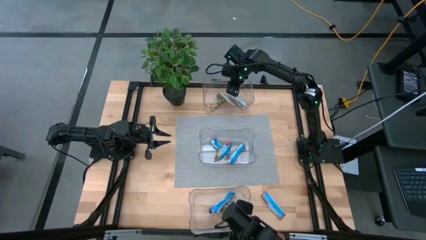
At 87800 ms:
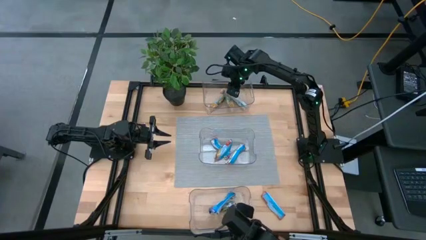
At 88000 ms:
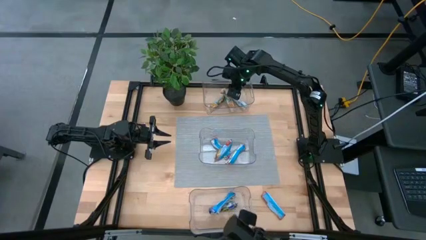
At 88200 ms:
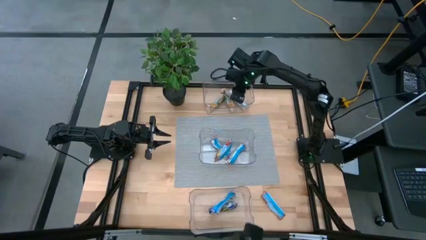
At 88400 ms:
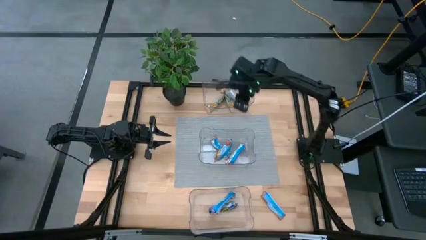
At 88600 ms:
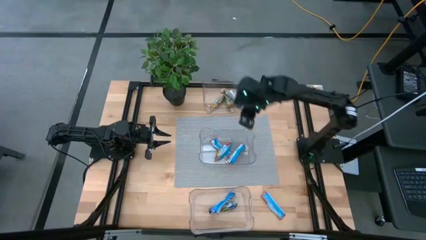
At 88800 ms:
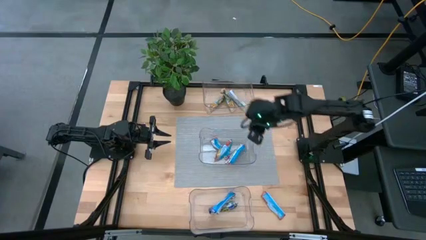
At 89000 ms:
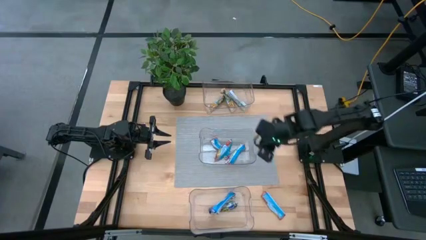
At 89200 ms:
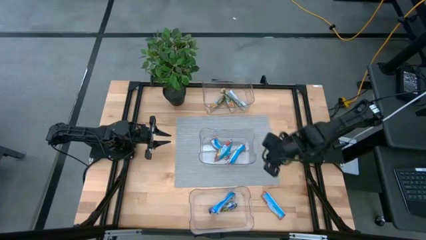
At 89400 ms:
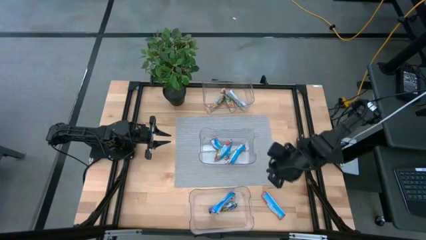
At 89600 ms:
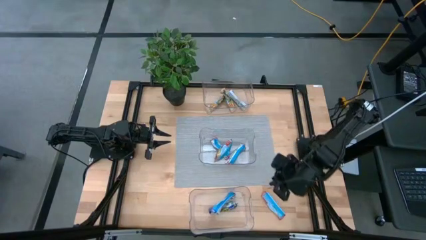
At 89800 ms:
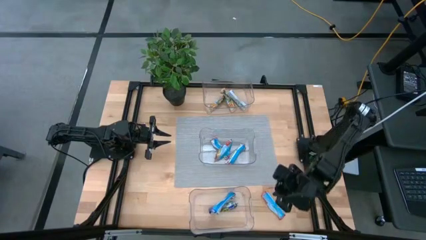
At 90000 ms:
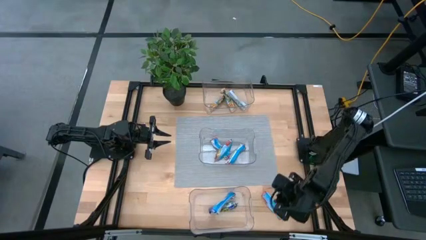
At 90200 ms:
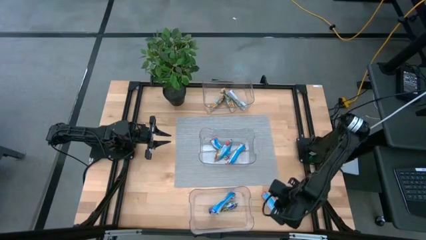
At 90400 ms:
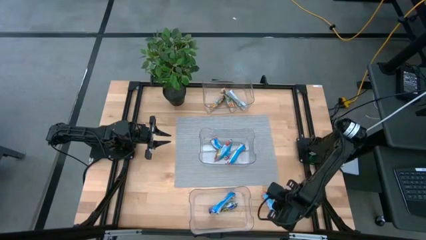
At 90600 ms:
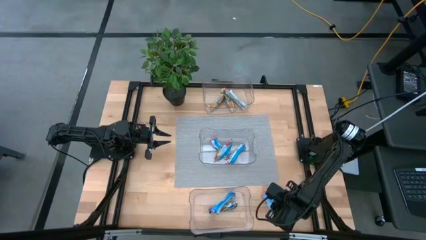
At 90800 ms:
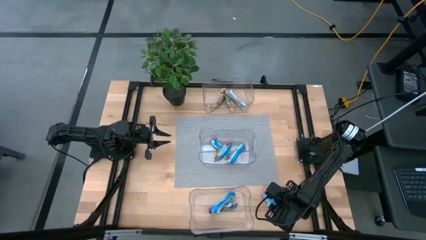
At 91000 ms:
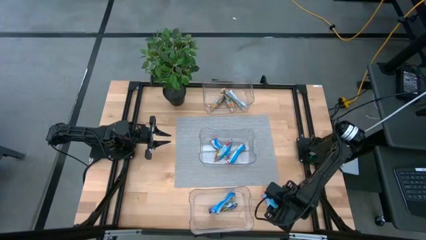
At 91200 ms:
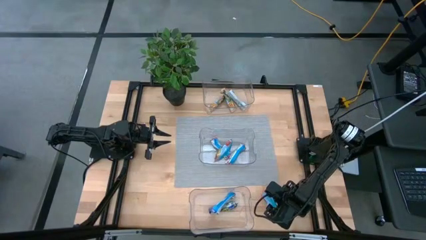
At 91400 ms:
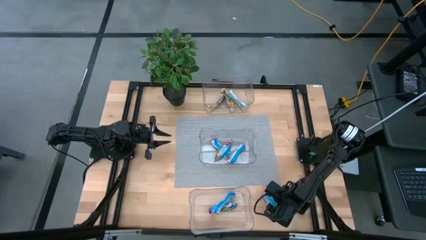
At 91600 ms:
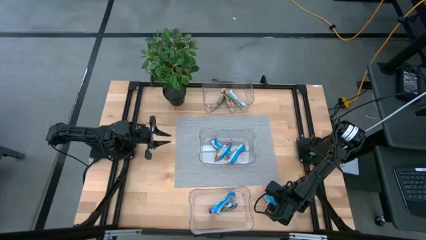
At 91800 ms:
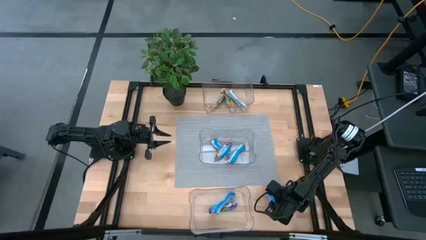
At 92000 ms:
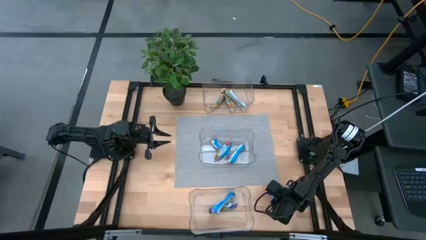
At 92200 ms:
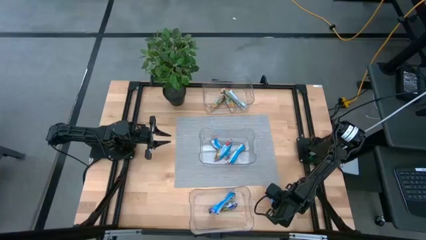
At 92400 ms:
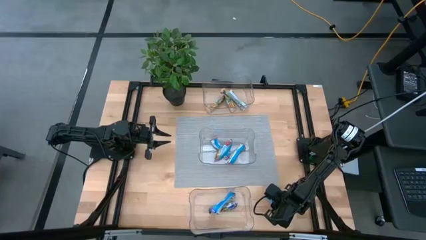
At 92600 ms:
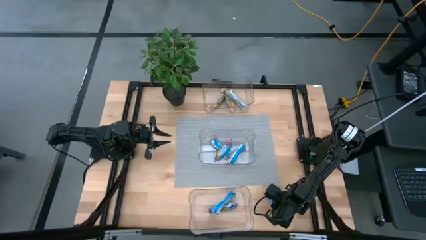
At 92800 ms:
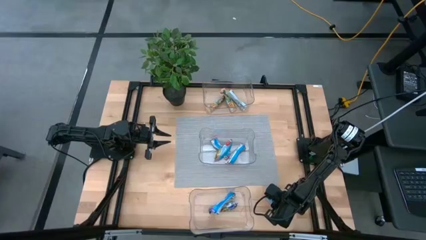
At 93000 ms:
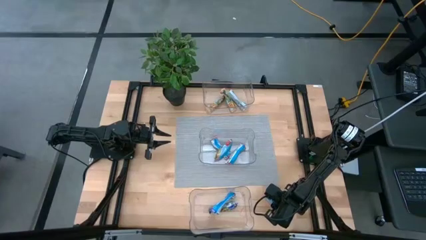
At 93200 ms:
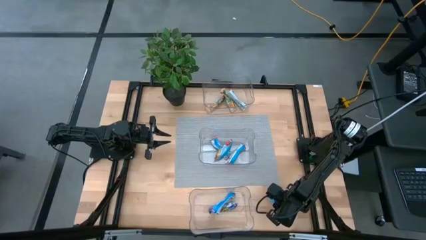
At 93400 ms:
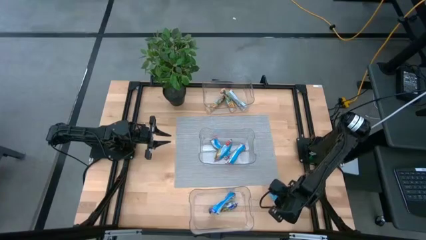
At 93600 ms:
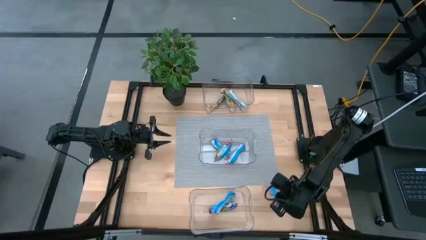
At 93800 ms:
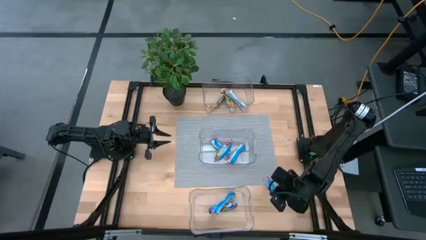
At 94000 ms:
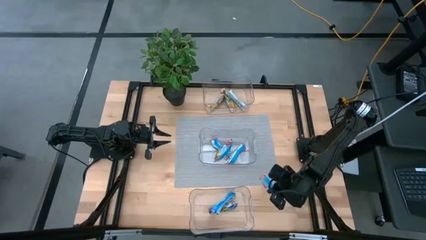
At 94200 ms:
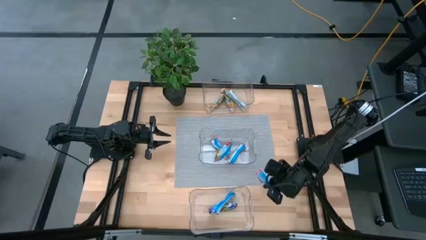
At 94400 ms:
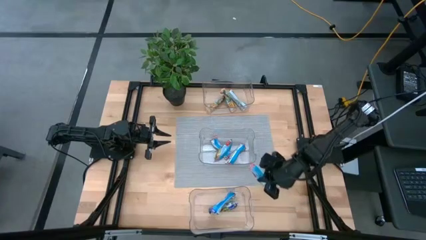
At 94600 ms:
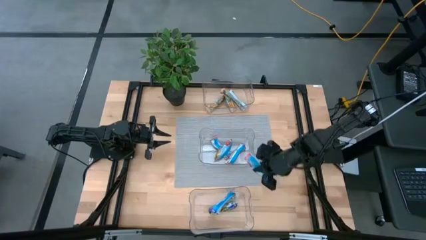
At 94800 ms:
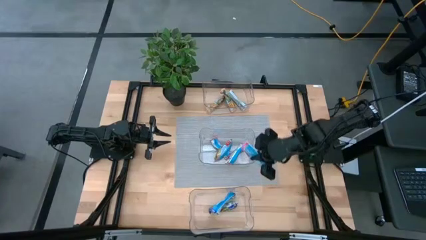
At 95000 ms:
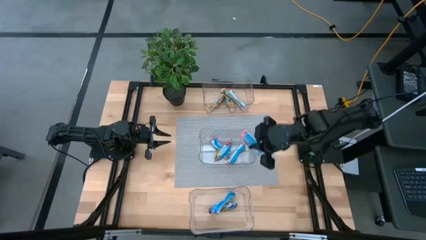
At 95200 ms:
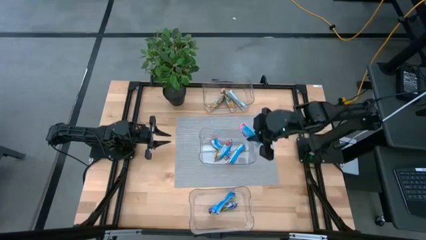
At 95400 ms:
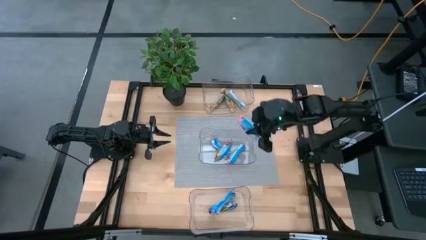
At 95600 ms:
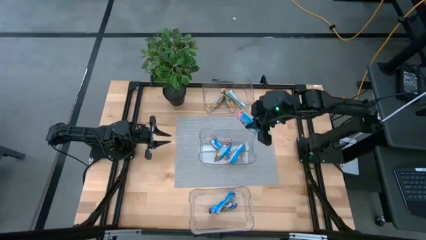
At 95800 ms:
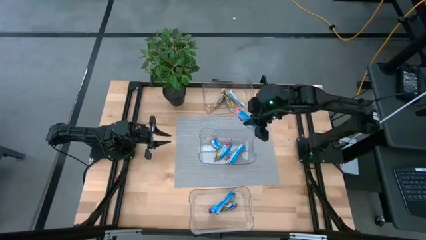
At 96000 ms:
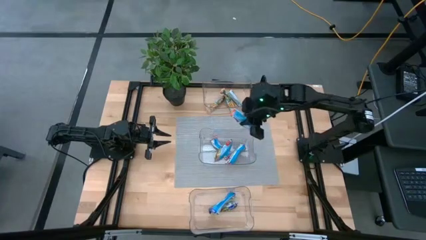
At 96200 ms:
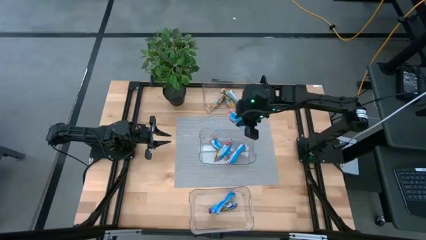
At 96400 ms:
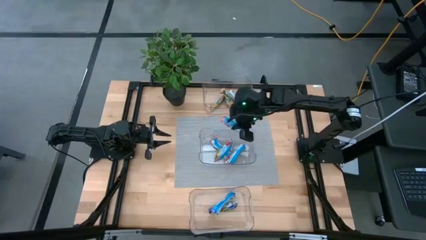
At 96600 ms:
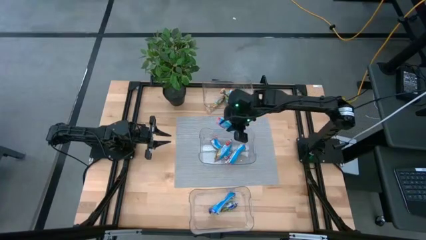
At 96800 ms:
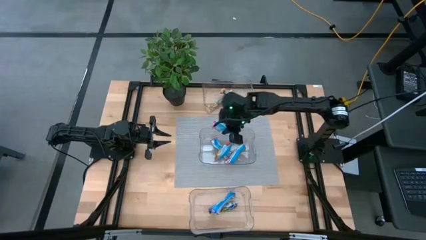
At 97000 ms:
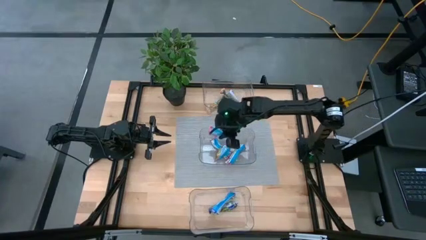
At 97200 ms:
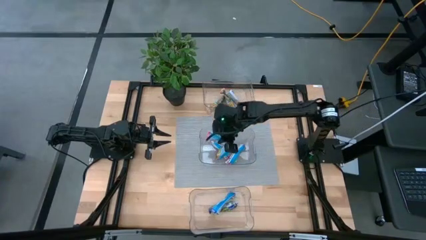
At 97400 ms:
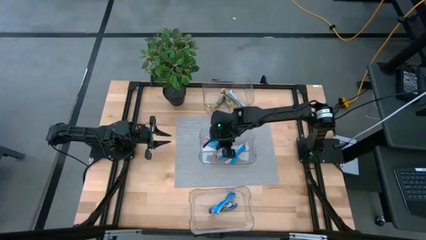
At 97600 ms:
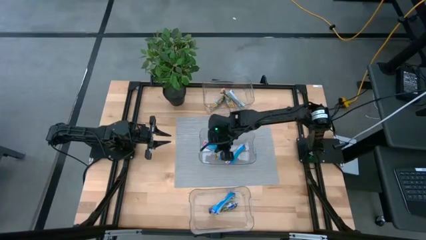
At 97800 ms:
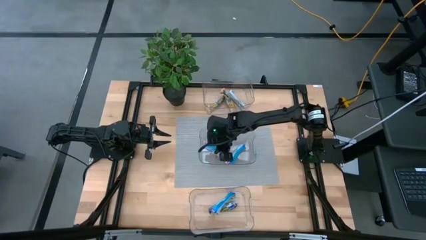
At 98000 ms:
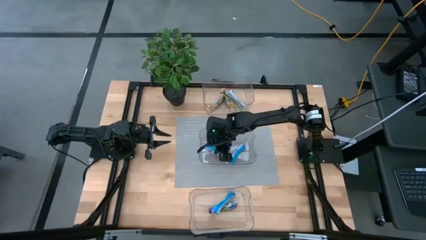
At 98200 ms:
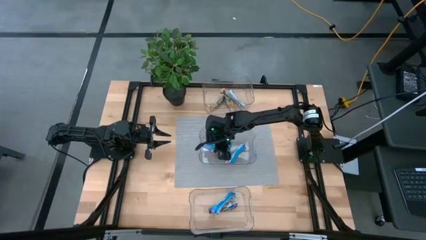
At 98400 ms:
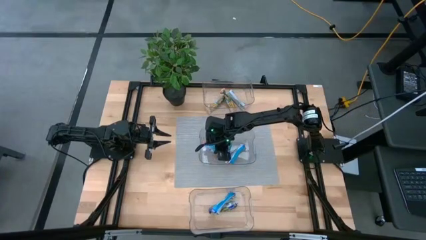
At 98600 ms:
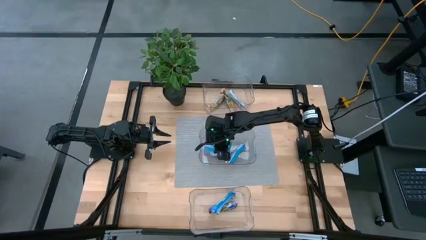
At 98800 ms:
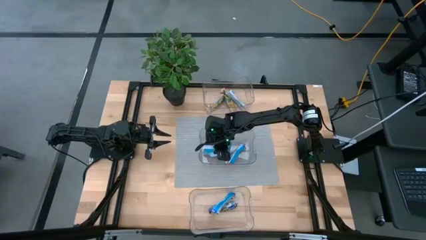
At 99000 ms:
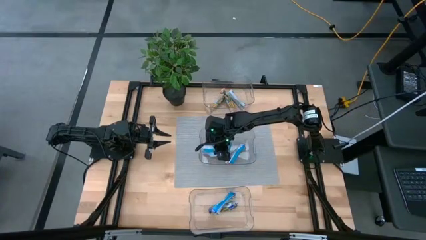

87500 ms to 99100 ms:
Task: Pick and place Granola Bars by type
Put the red granola bar into the middle transparent bin

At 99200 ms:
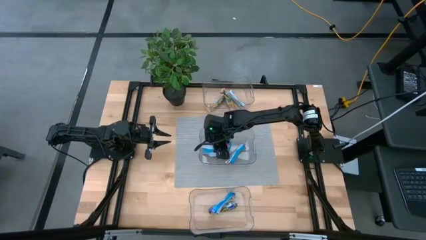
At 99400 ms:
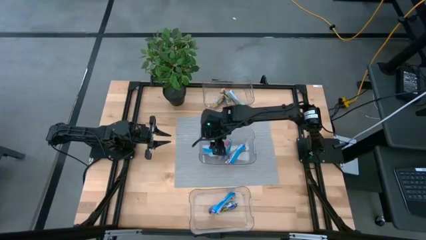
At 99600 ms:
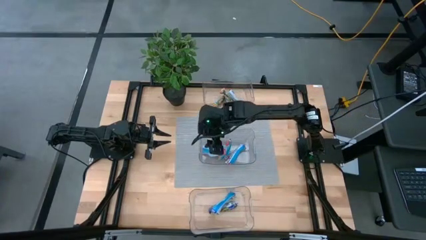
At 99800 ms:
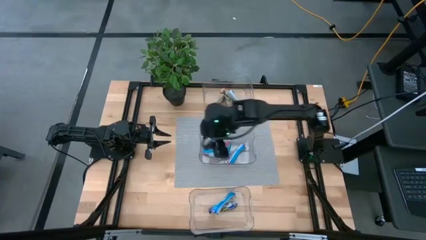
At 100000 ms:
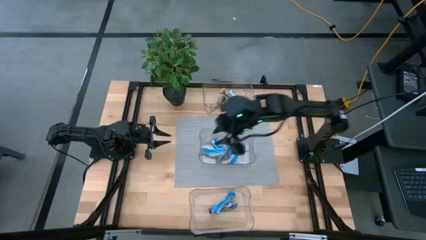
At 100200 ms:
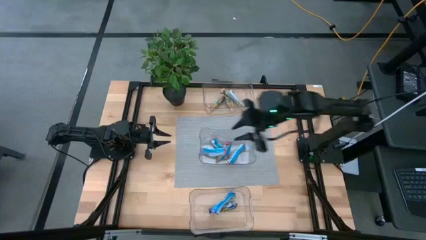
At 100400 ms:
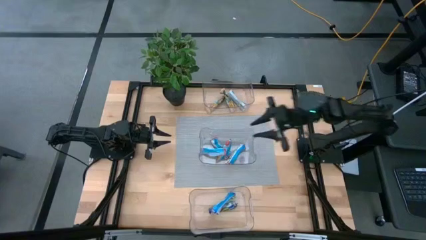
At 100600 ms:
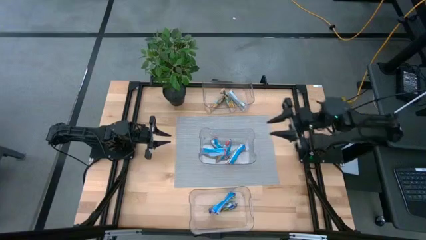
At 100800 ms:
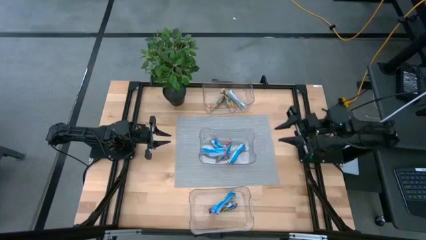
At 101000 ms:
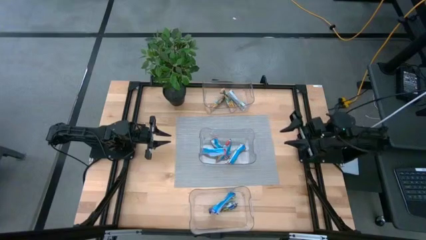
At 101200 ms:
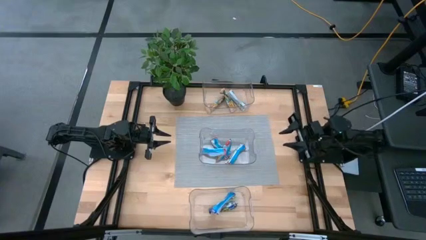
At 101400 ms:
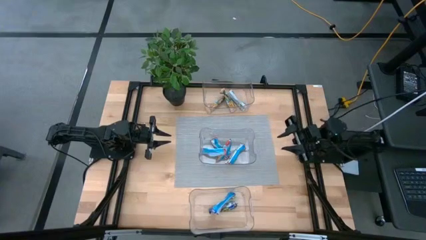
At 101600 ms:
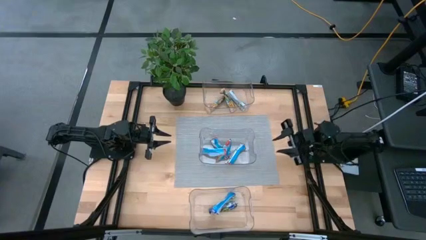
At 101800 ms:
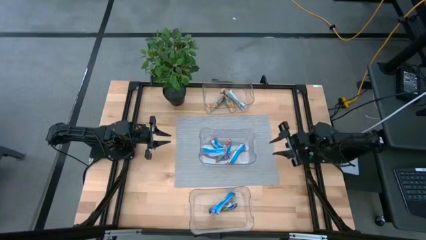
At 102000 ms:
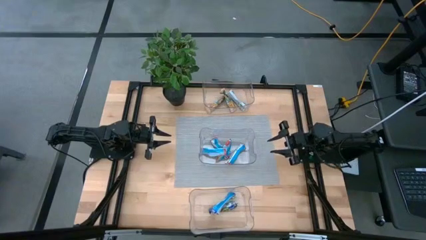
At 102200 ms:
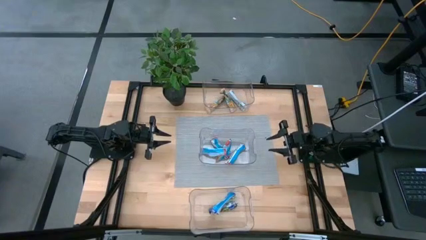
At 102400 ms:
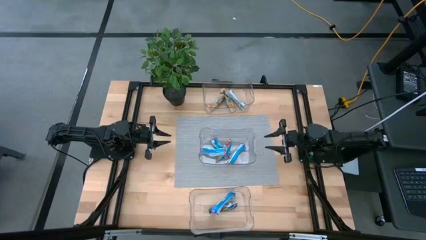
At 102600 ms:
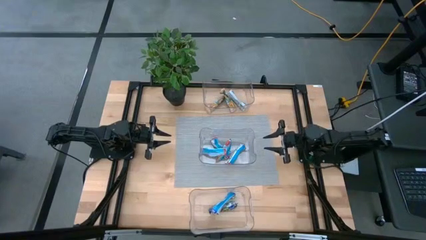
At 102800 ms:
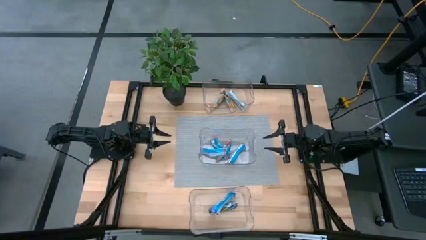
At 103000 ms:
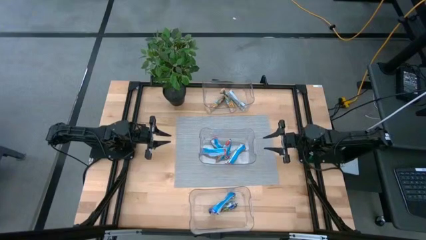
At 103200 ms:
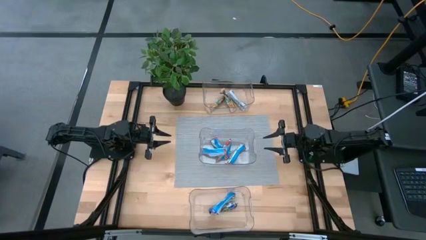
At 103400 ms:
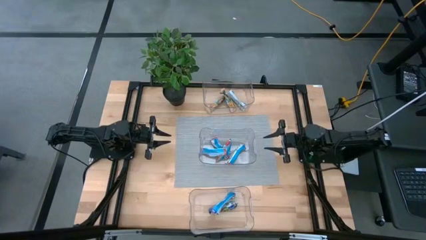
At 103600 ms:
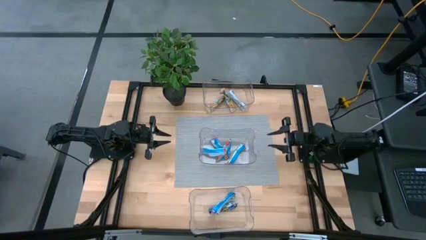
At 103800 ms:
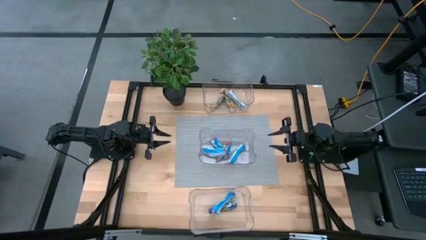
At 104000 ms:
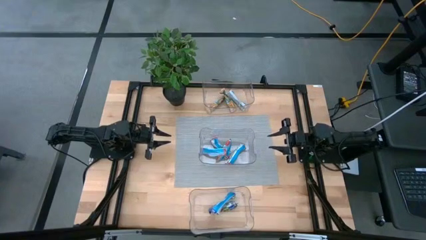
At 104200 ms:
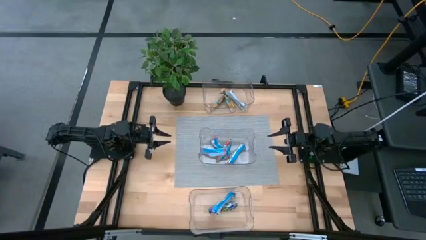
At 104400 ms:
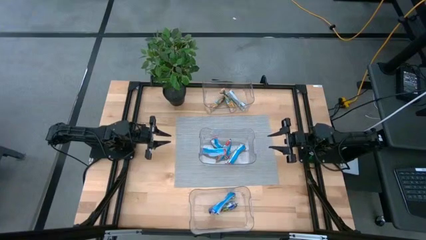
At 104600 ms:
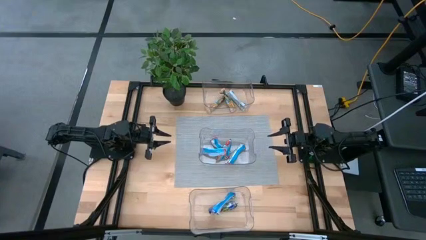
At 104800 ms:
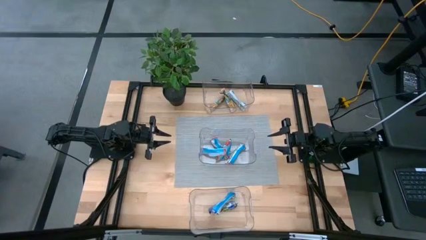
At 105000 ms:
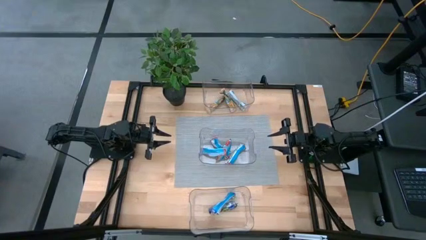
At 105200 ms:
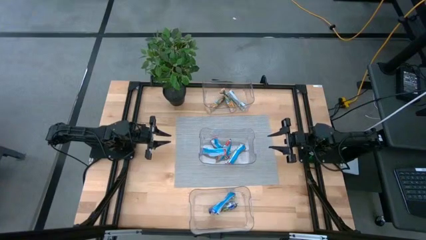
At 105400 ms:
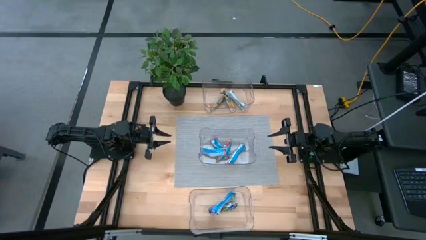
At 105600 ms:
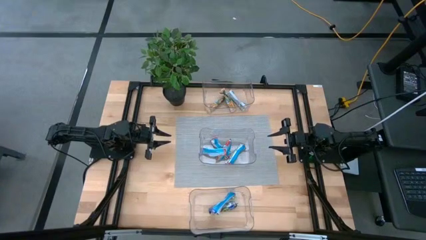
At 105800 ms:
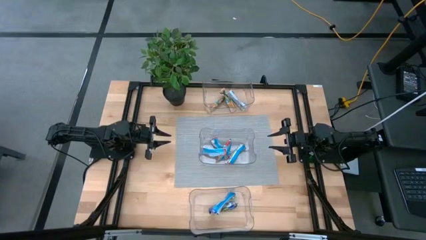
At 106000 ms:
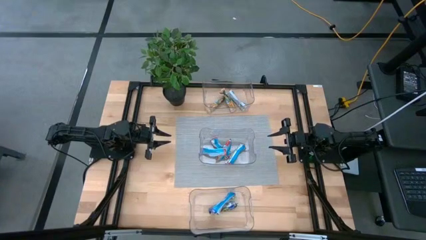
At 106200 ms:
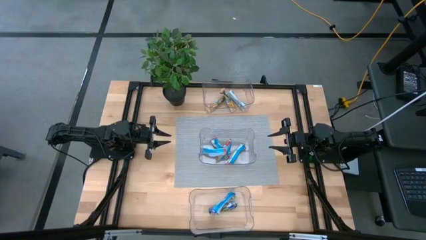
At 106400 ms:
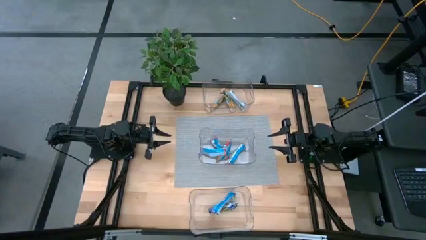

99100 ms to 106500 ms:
Return to Home Position
